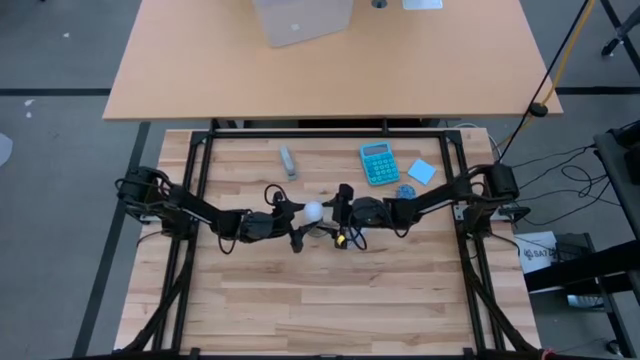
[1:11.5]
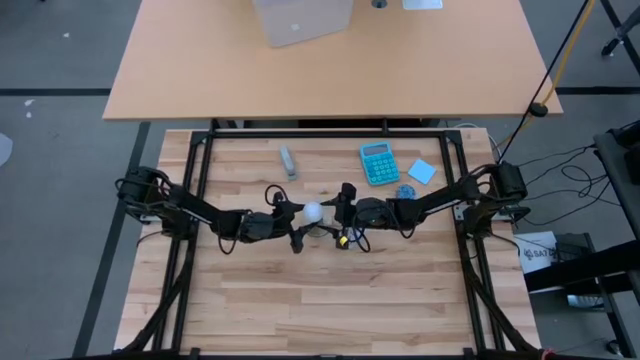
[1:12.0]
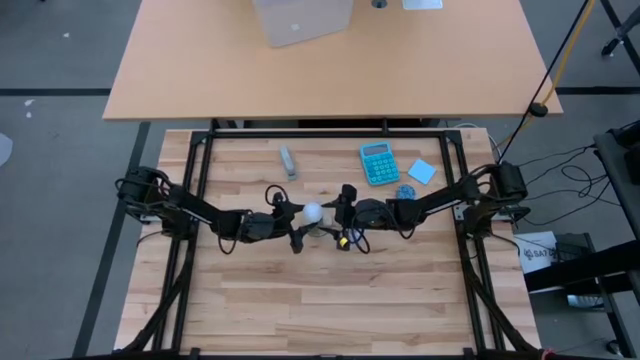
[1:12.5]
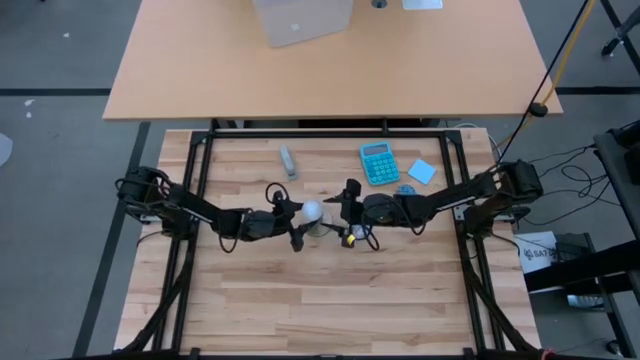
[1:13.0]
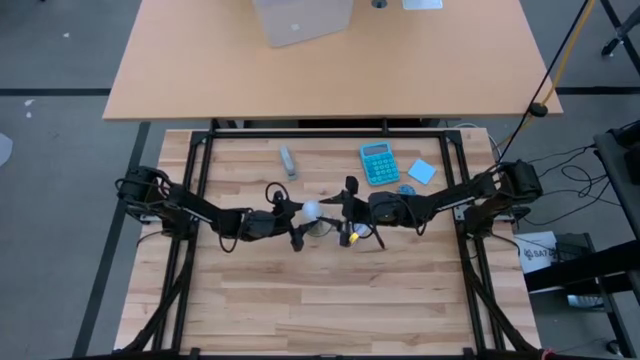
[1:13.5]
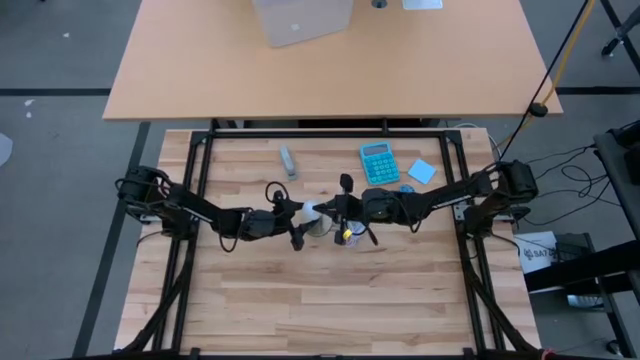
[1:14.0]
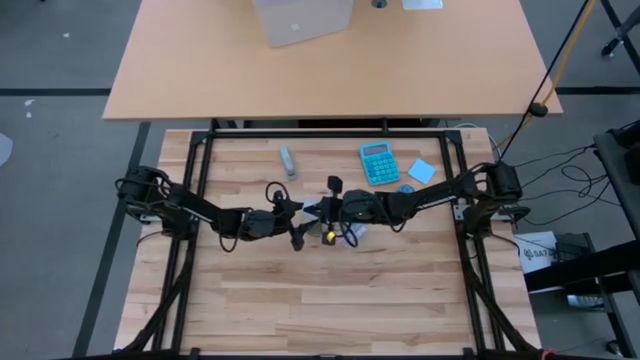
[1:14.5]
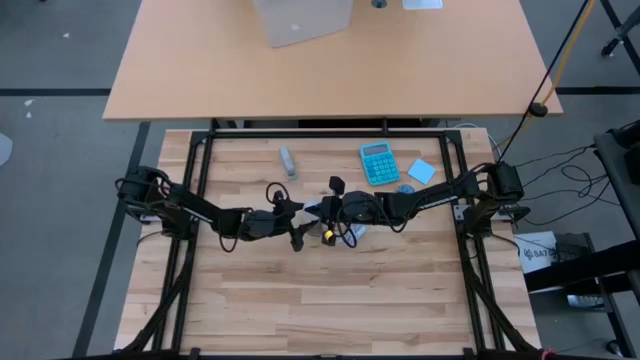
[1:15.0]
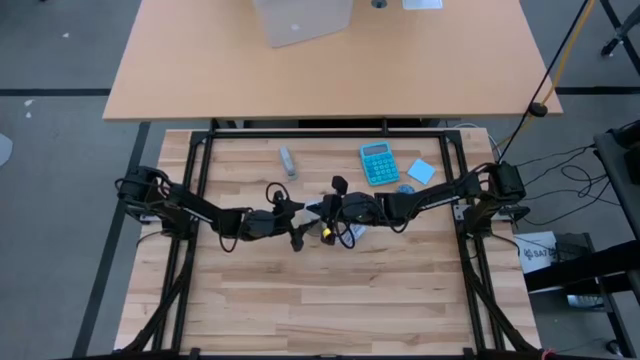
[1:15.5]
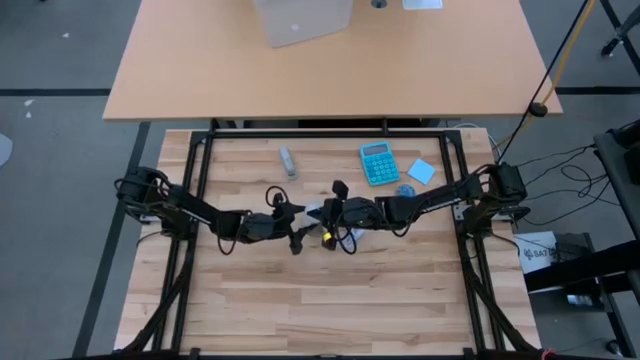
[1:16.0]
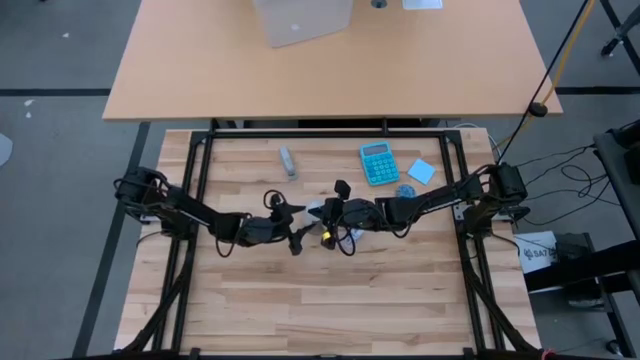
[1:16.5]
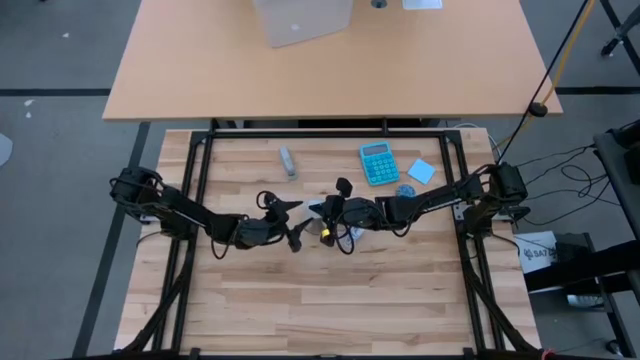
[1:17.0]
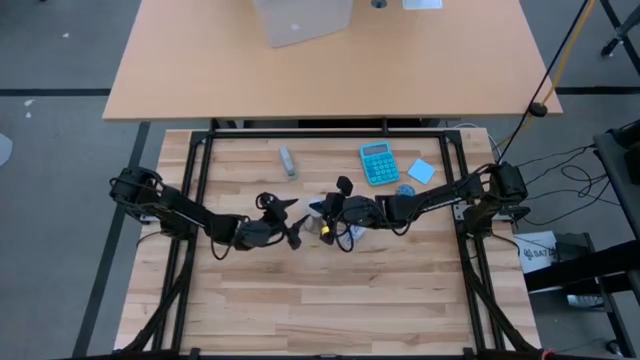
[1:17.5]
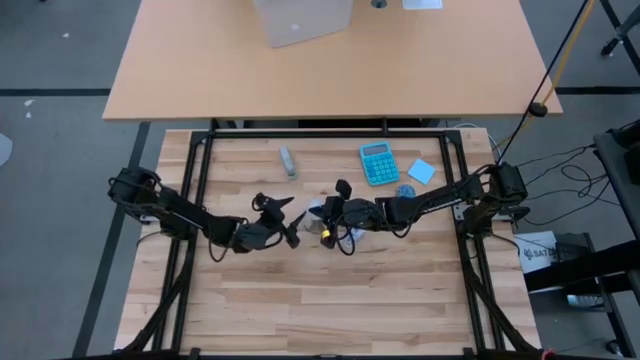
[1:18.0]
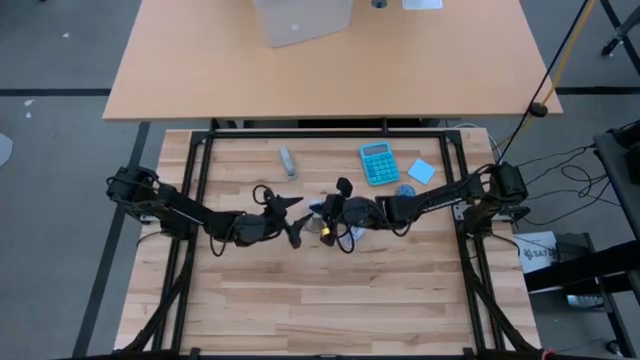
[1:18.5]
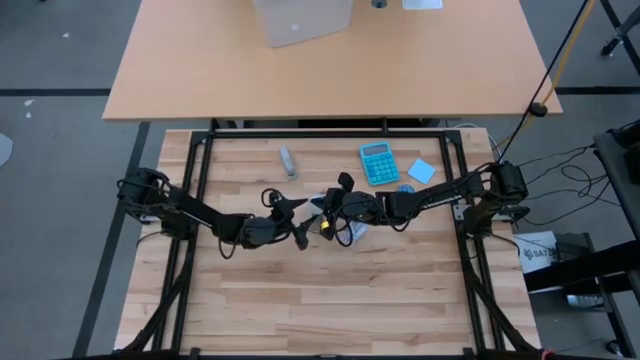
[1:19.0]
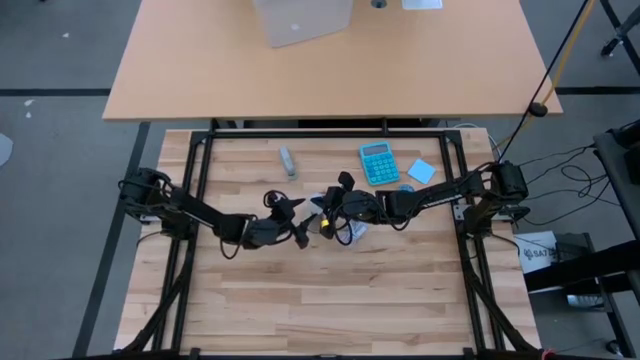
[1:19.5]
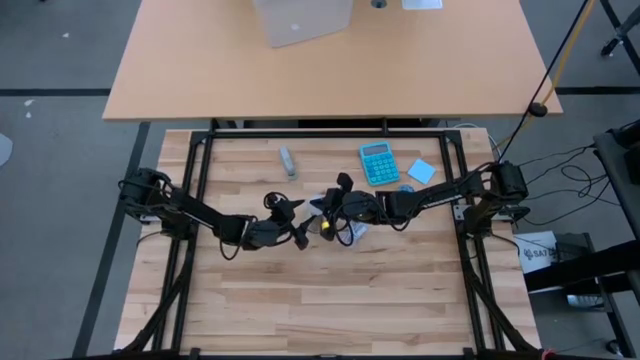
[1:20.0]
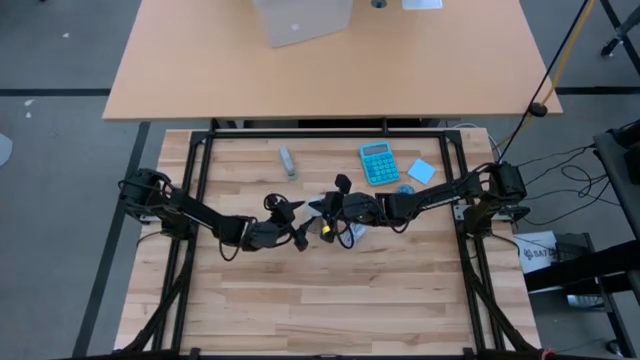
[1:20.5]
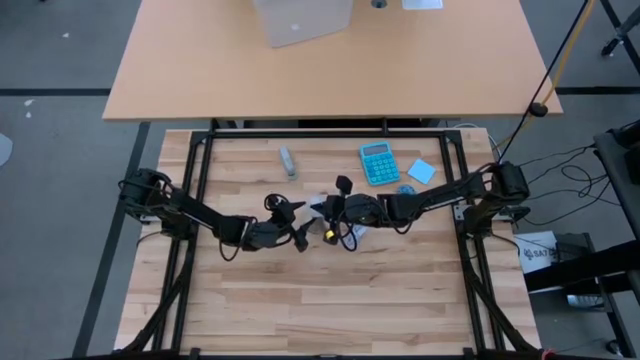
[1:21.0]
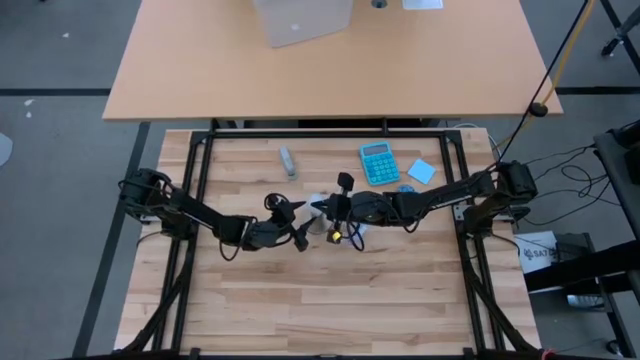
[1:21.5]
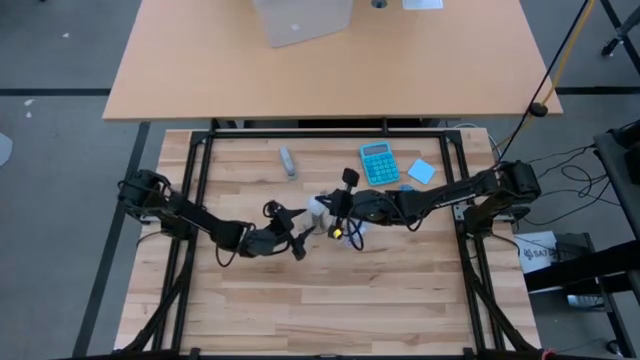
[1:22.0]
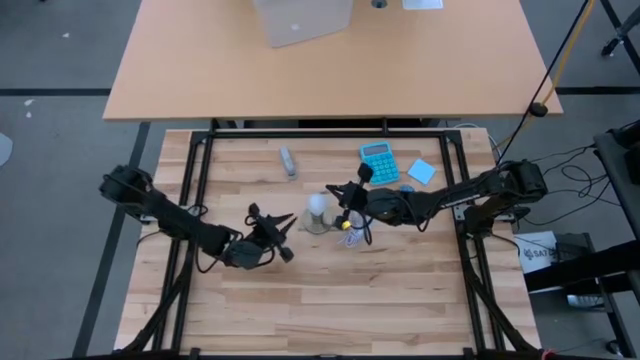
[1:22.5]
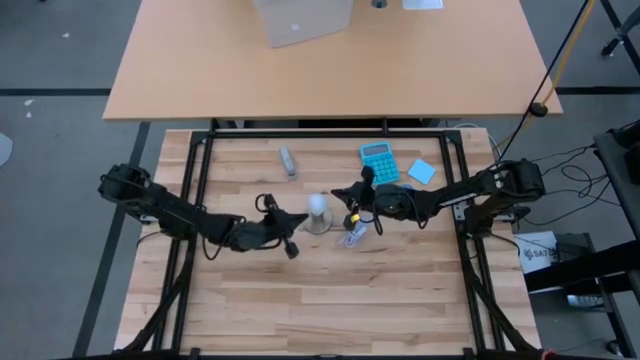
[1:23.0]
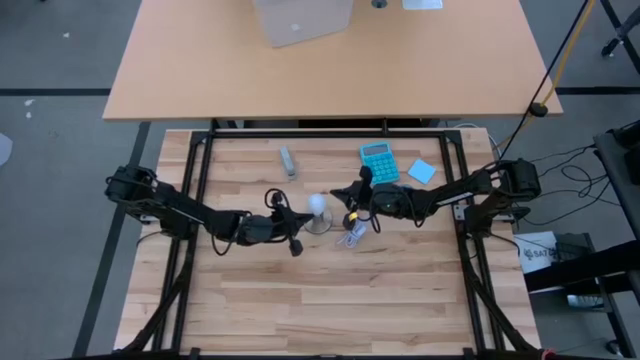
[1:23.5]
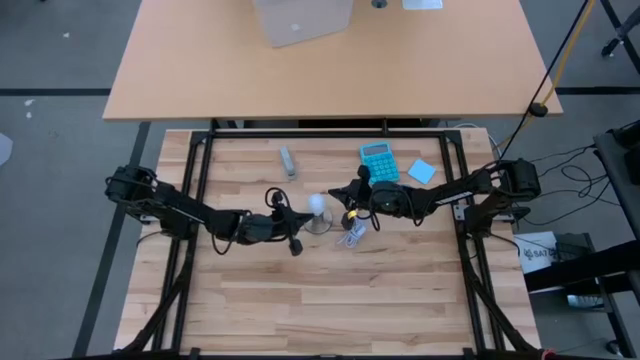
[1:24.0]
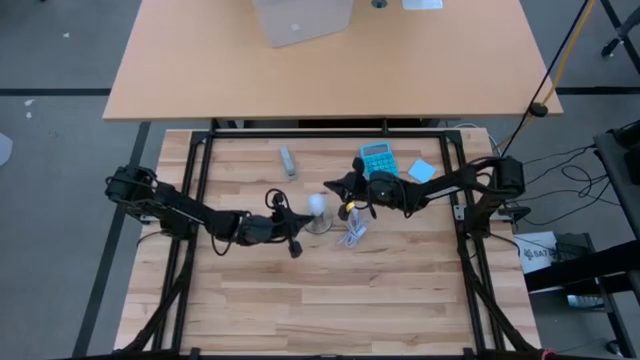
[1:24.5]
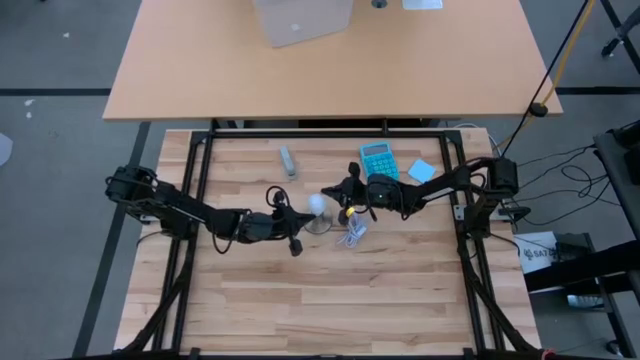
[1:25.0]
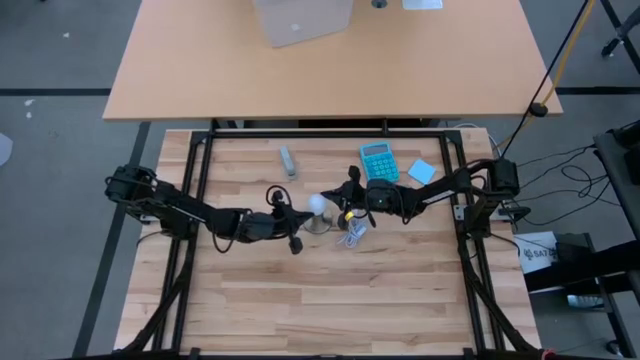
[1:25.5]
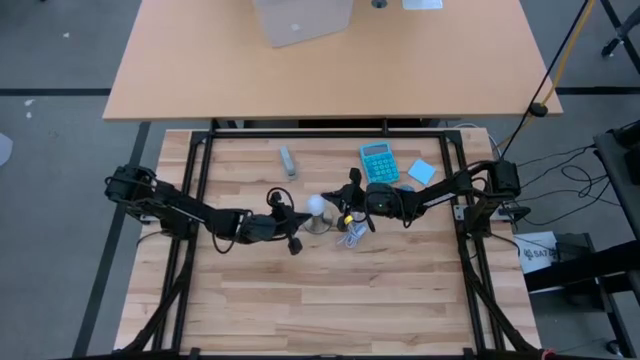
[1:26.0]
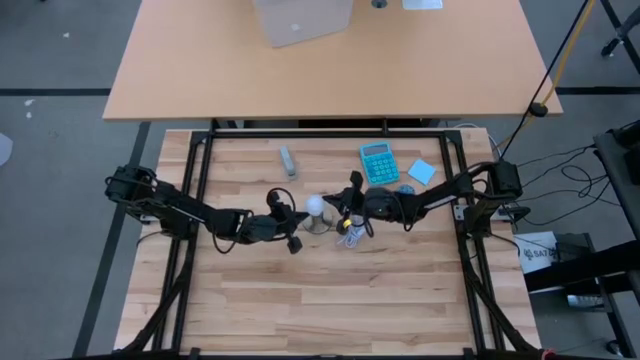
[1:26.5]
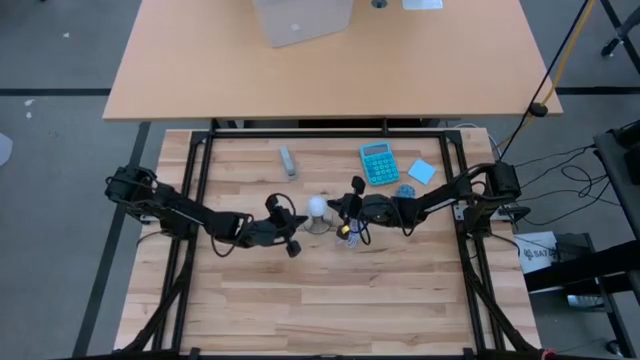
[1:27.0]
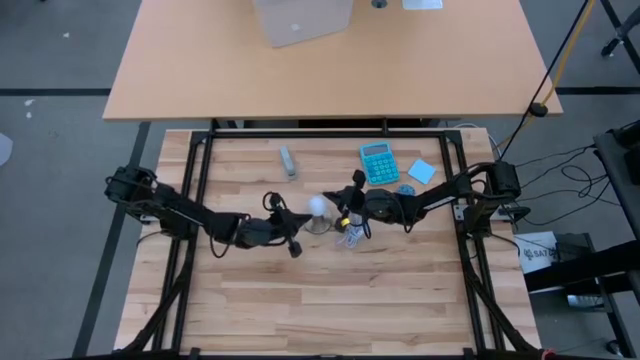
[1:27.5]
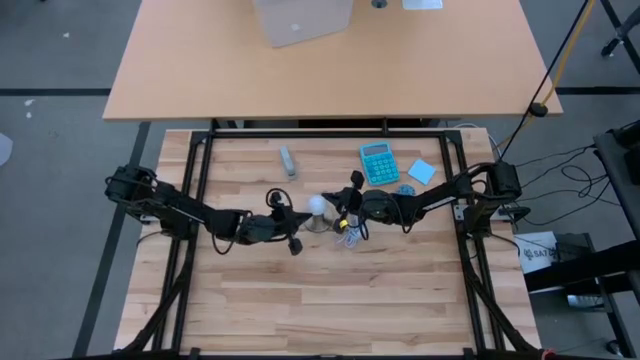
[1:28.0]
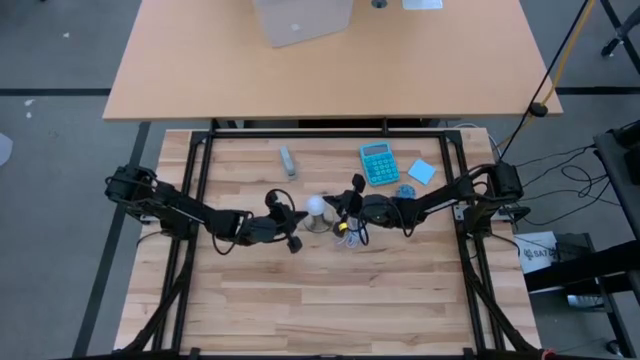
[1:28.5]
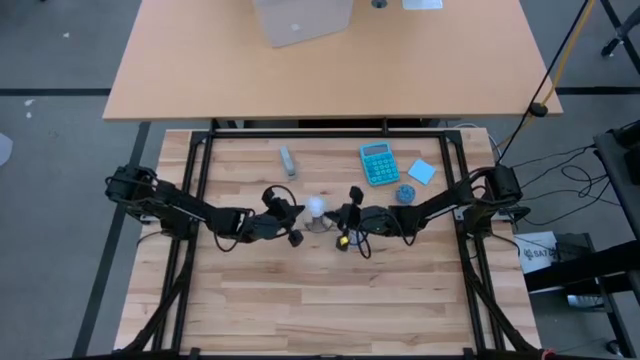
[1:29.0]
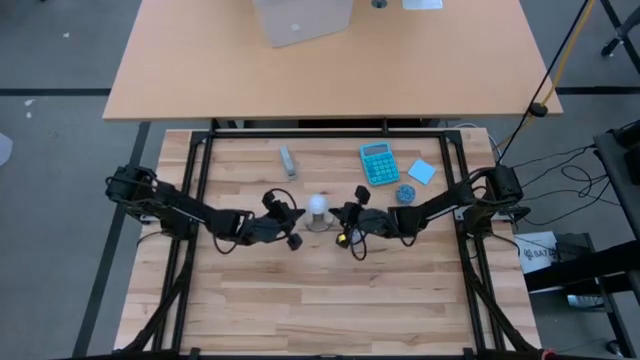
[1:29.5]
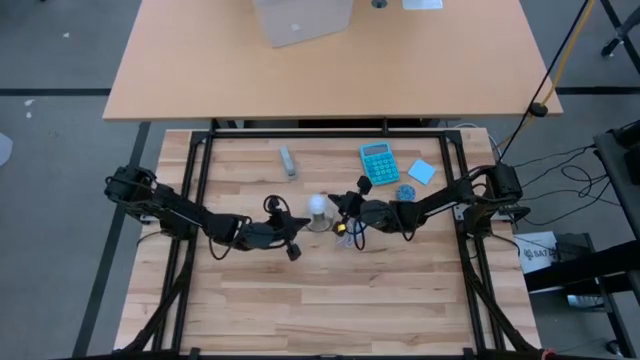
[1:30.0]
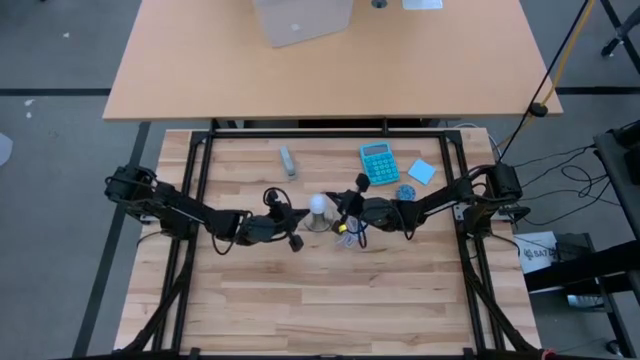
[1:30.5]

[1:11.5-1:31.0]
Task: Screw lightbulb
Insert the white lightbulb into the desk lamp

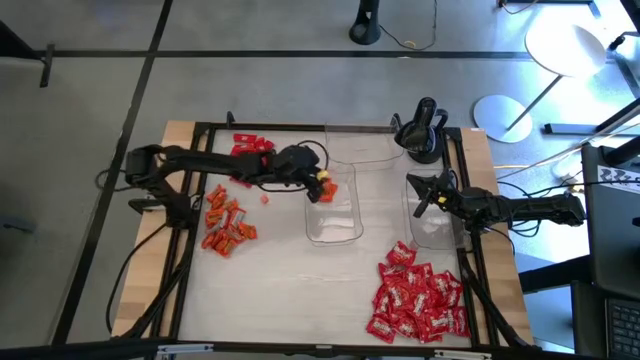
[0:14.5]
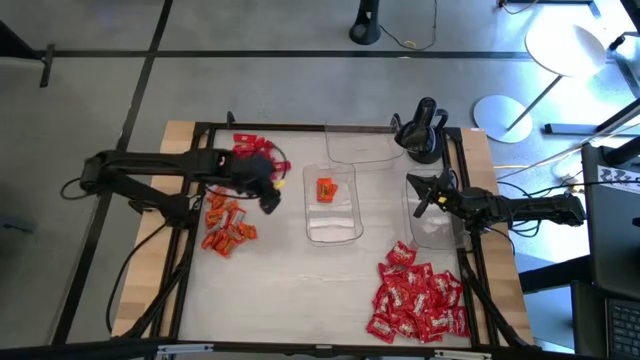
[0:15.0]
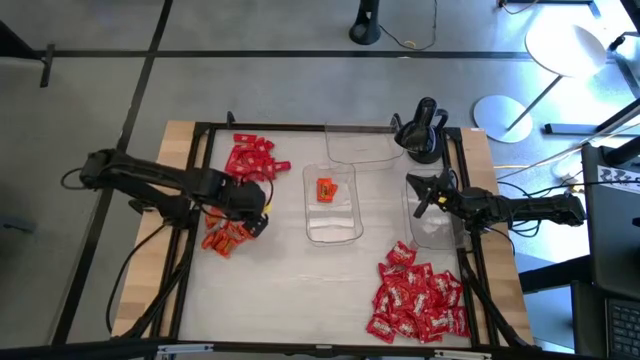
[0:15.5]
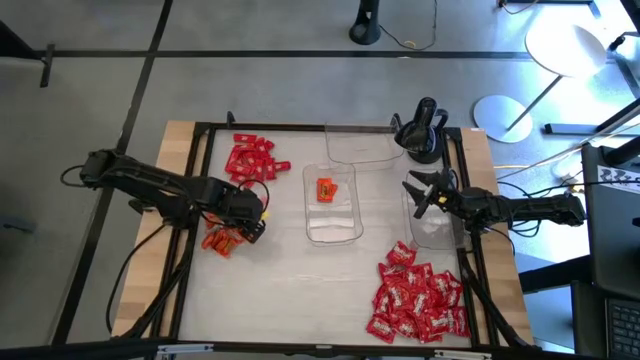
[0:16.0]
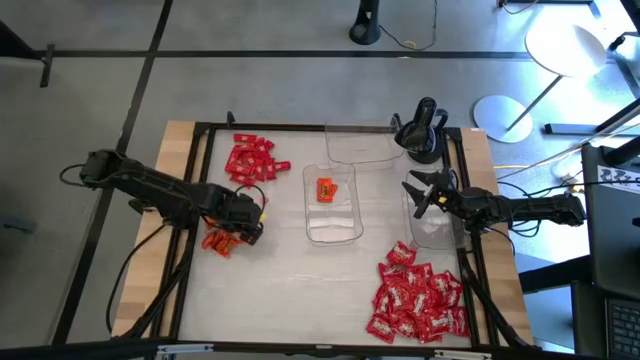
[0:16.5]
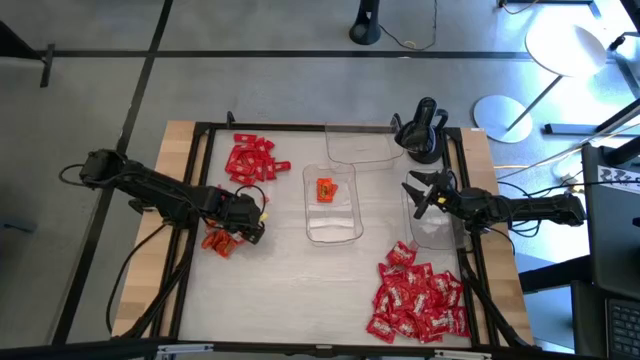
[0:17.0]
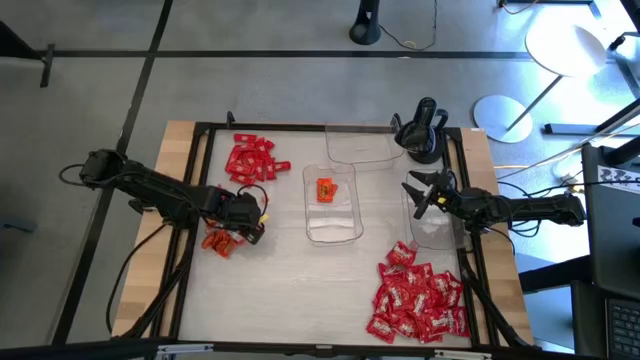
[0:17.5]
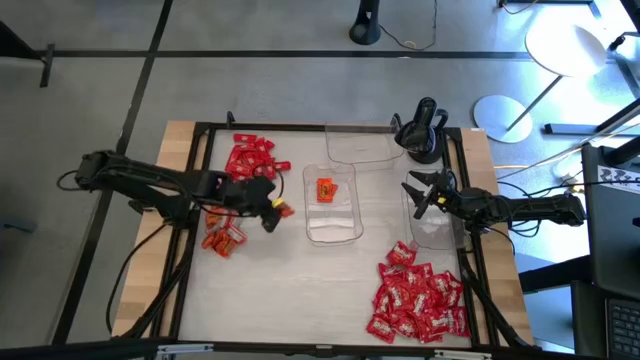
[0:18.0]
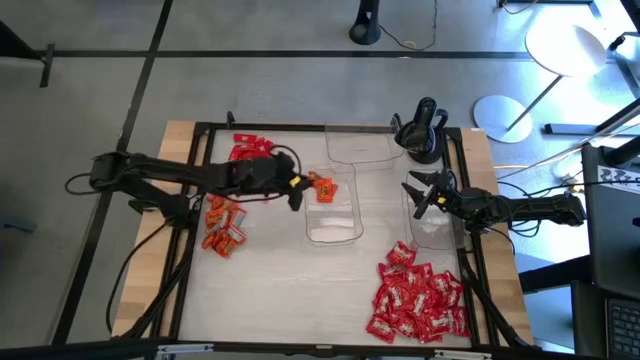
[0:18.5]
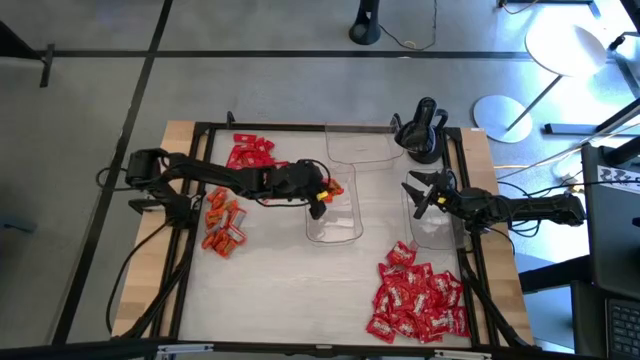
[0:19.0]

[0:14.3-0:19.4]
Task: Sort candy
Put the orange chocolate into the bottom left transparent bin
